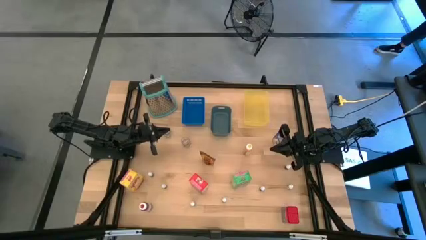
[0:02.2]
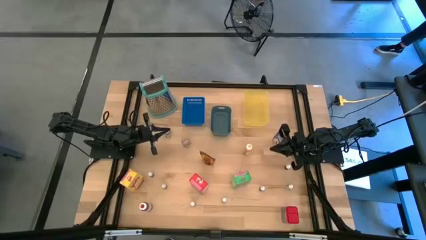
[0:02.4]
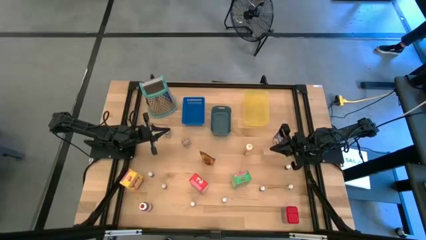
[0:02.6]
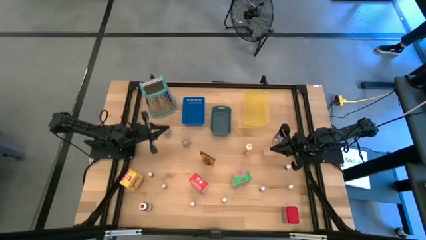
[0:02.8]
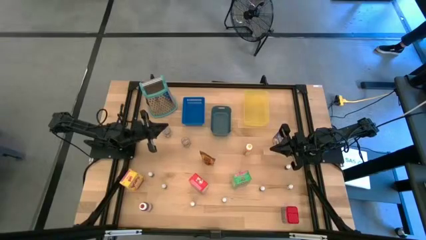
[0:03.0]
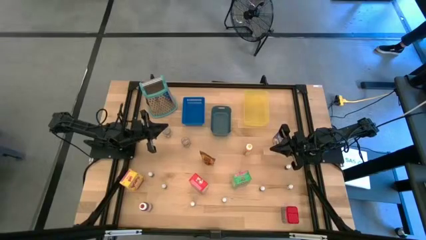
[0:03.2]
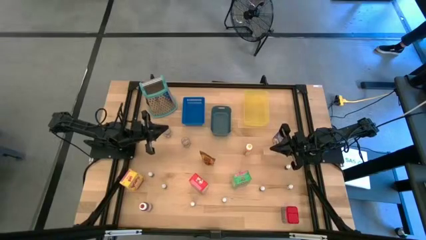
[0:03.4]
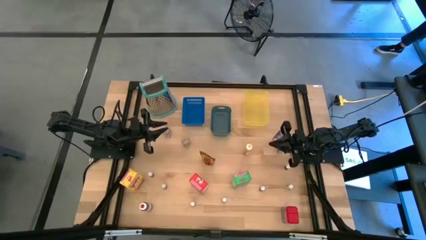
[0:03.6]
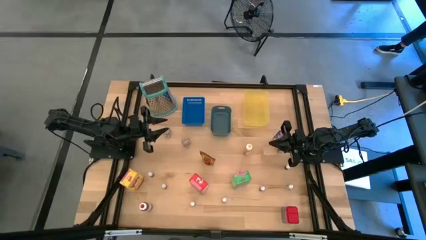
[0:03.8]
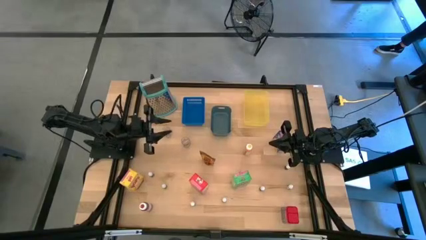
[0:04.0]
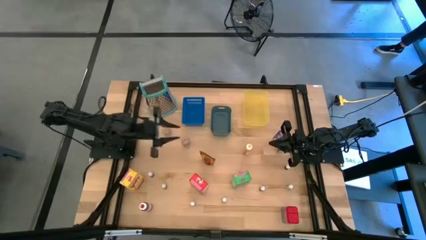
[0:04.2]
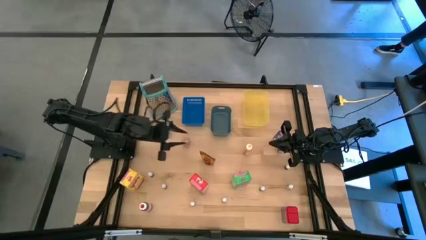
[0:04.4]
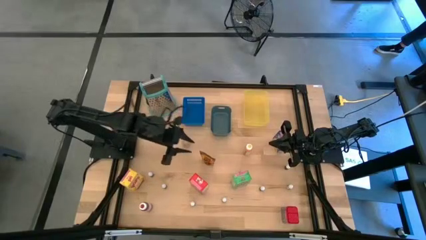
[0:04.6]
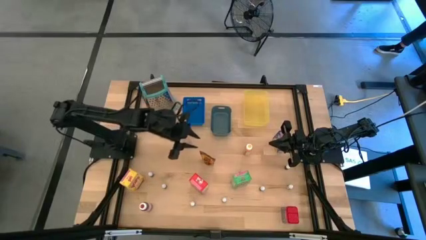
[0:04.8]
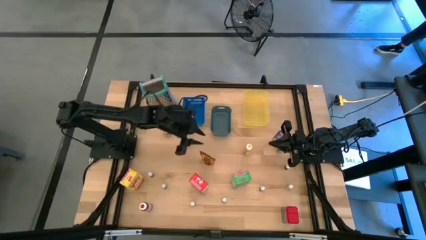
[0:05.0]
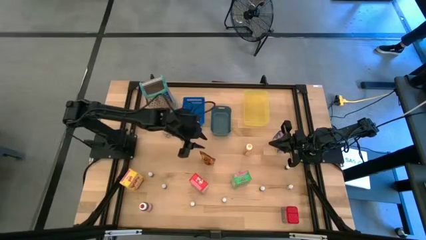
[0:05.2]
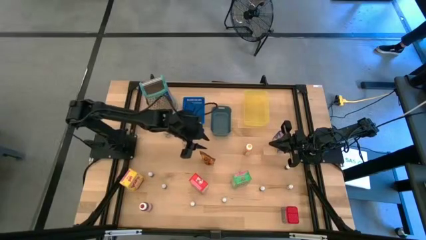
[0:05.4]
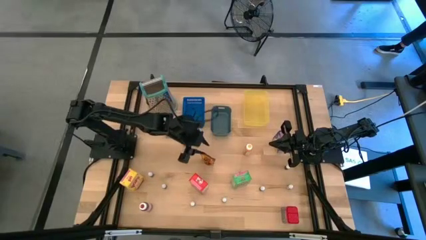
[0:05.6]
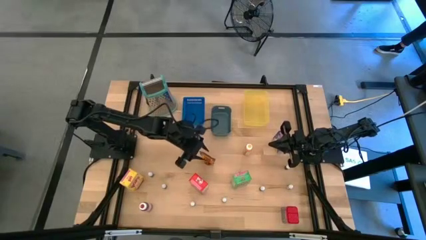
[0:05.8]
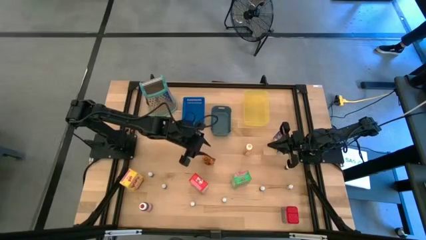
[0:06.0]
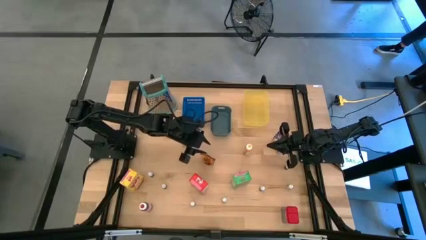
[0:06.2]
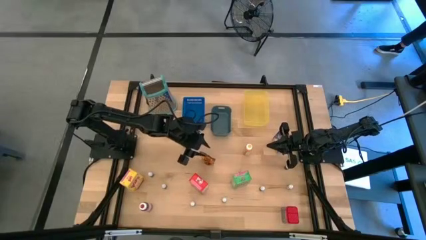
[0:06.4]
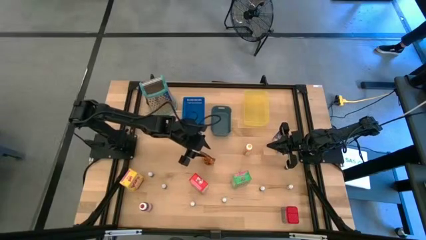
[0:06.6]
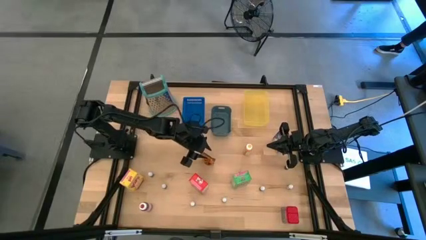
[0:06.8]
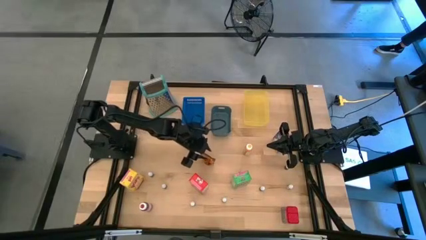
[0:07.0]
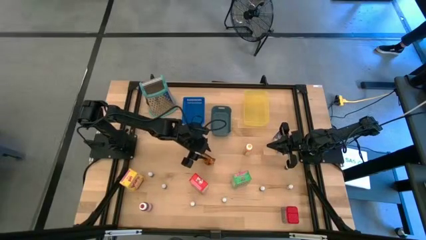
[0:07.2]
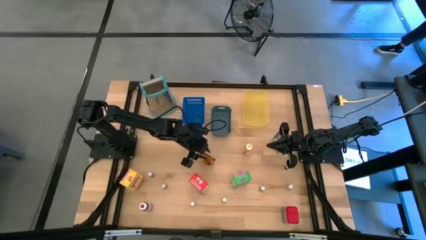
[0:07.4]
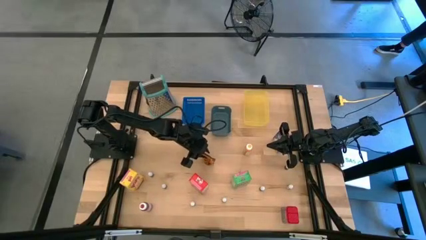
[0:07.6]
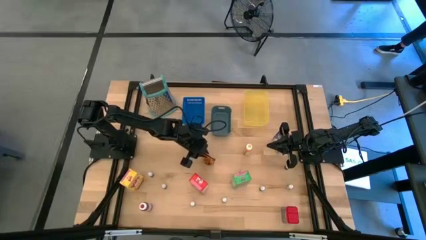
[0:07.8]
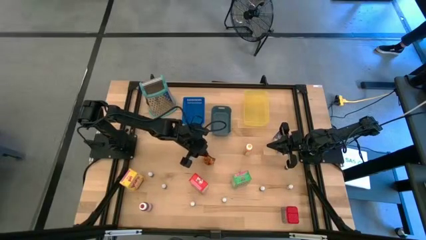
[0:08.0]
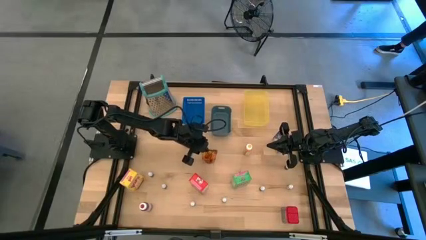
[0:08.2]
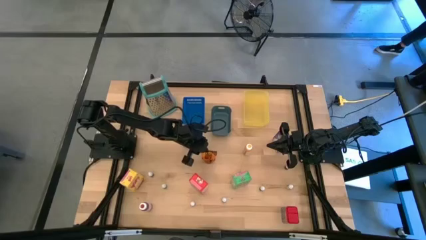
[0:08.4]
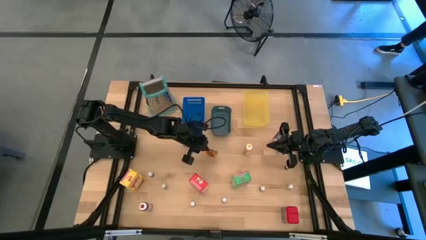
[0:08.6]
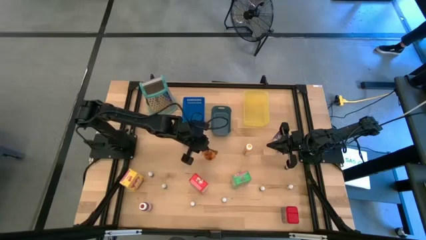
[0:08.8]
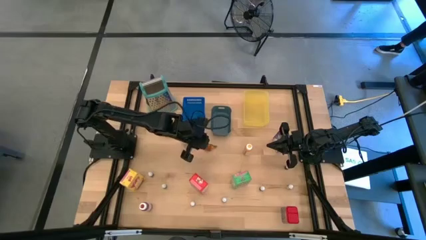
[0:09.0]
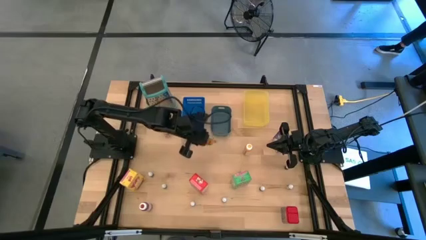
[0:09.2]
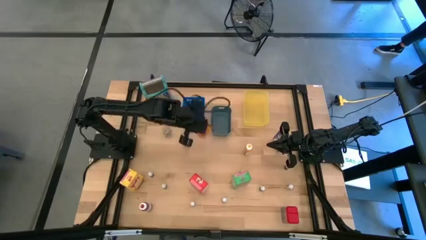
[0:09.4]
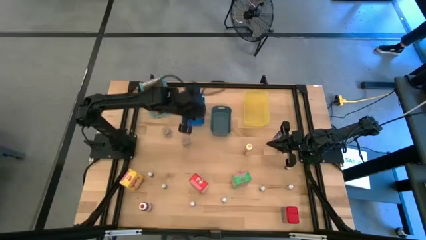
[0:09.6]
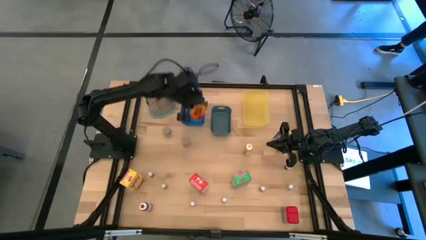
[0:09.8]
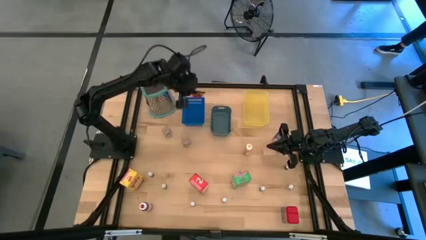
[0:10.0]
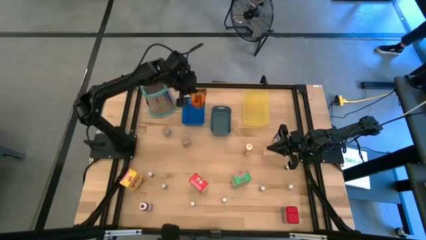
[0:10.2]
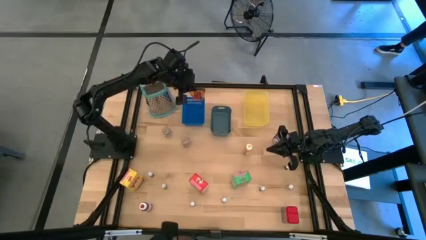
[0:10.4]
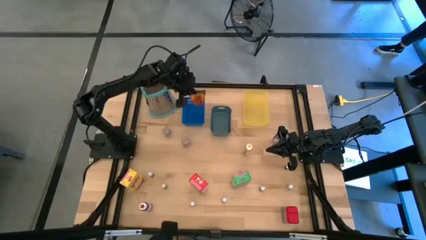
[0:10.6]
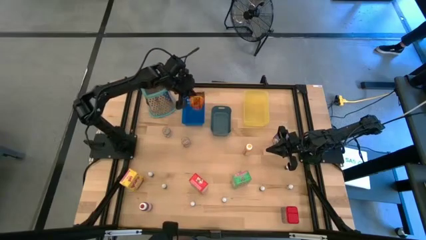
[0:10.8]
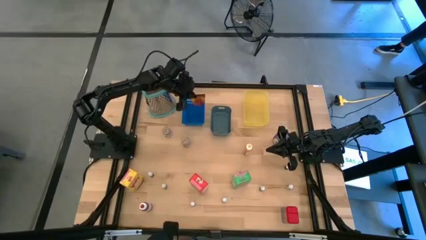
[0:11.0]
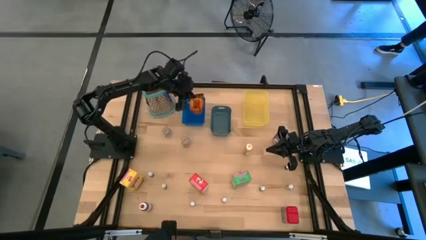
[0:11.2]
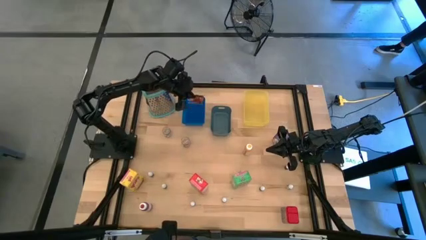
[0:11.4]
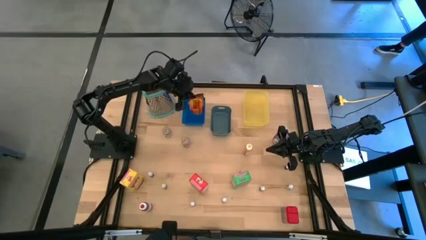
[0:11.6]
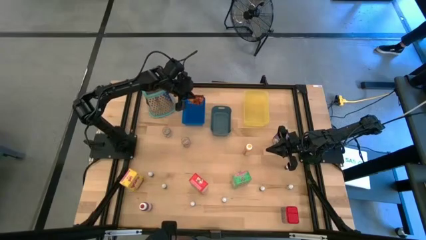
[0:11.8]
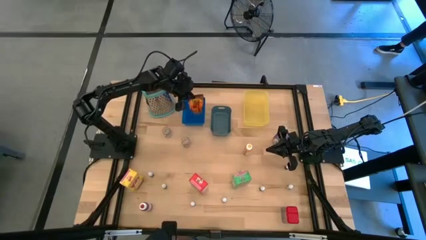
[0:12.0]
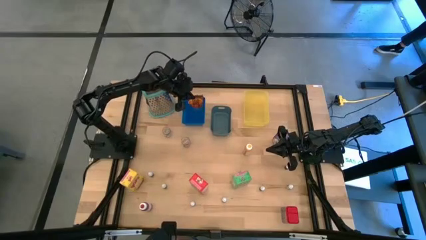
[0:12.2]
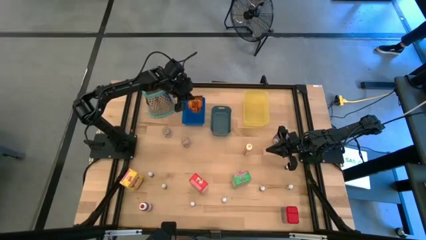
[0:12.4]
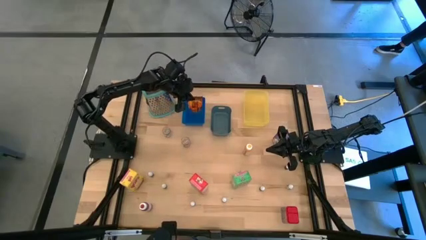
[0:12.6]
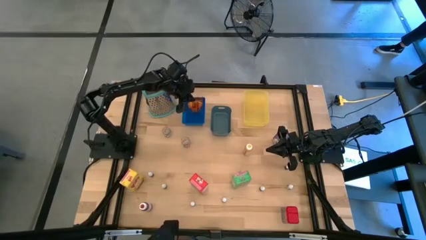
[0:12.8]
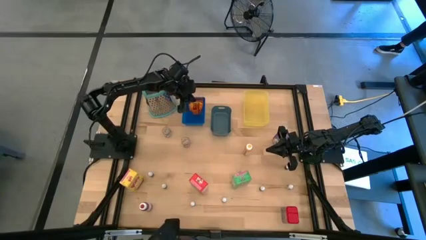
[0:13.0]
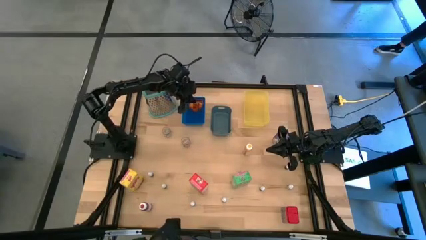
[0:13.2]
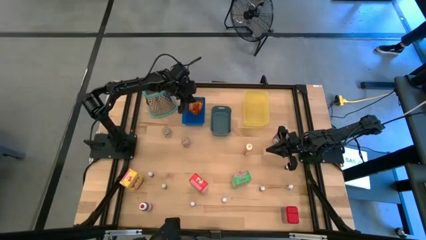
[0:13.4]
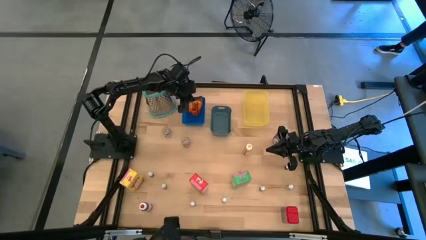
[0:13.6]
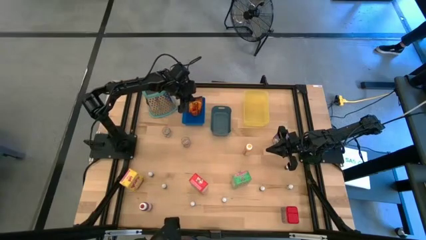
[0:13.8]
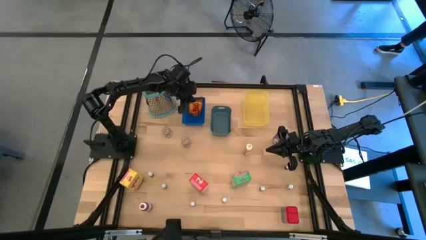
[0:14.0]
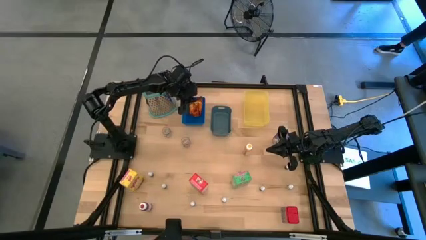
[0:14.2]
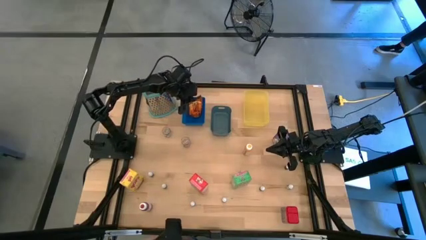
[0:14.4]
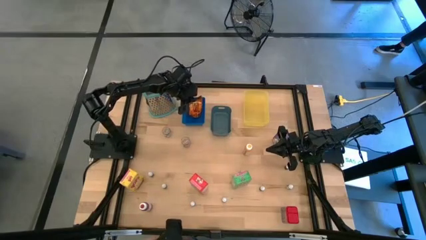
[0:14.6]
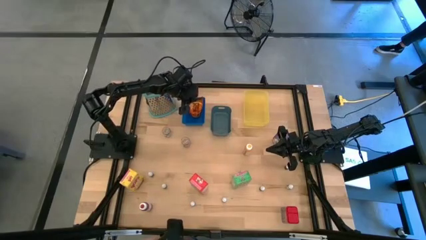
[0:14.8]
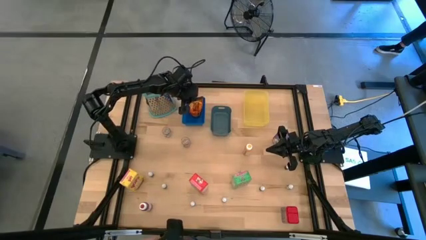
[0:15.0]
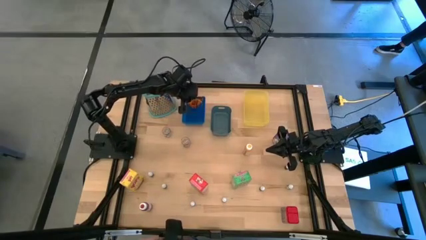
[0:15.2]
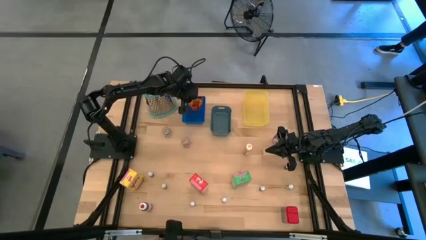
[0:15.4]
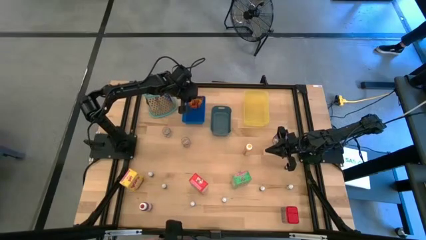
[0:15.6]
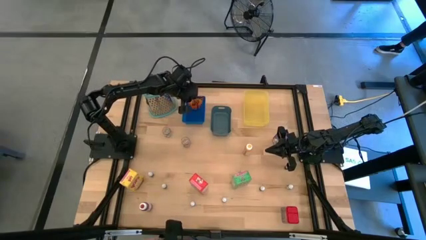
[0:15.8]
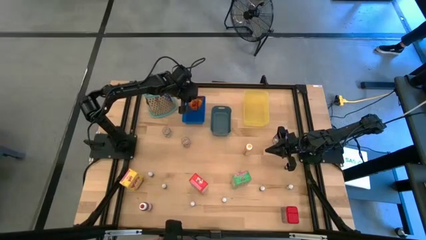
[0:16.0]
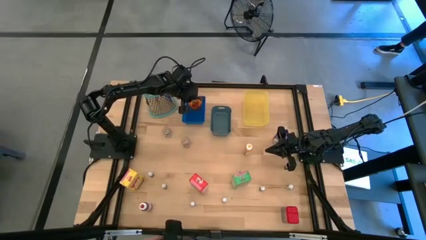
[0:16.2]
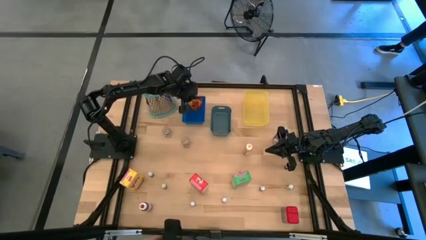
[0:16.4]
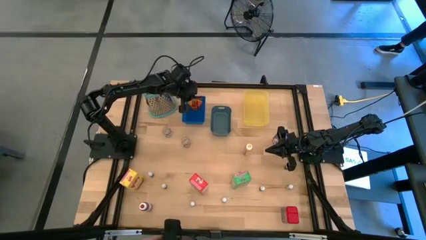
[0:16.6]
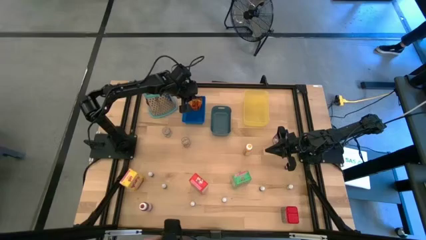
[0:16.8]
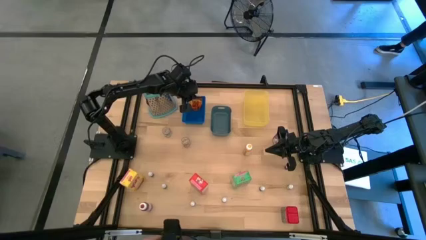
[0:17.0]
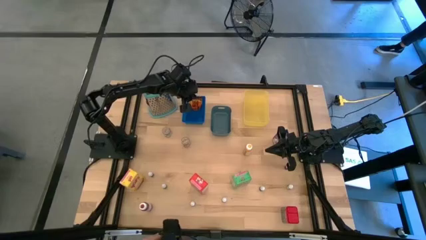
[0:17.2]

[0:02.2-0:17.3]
Task: Pick & Place Kitchen Items
Put the orange seasoning pack into the blue bin

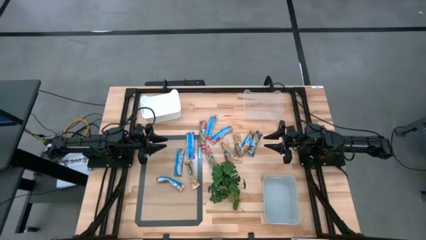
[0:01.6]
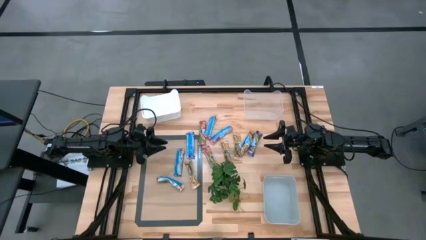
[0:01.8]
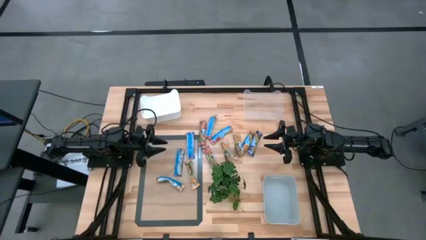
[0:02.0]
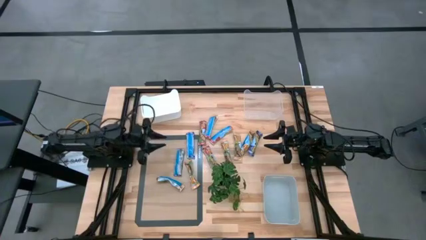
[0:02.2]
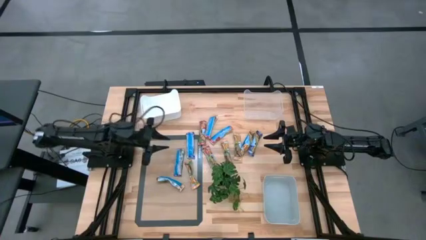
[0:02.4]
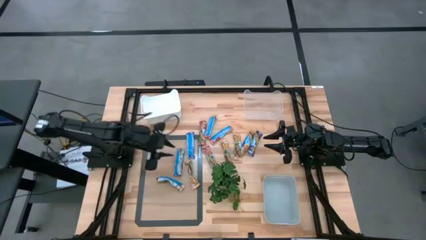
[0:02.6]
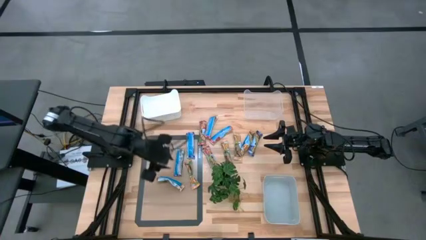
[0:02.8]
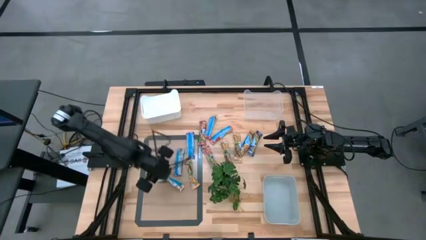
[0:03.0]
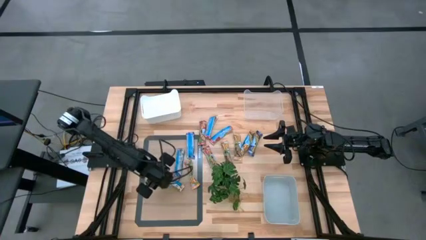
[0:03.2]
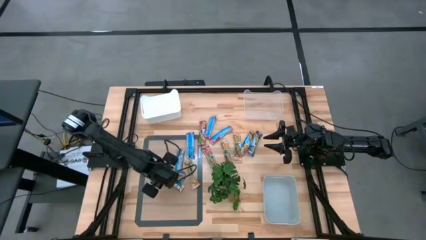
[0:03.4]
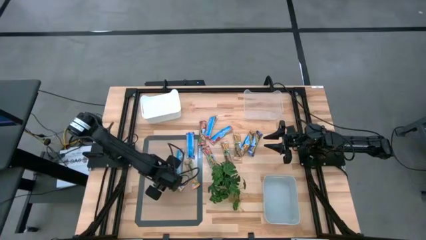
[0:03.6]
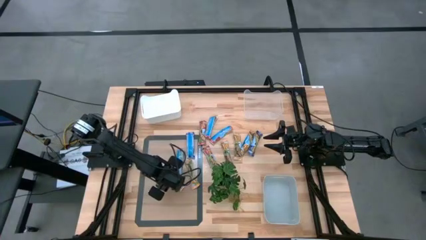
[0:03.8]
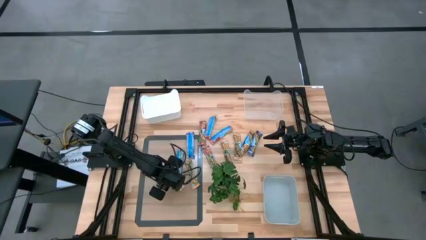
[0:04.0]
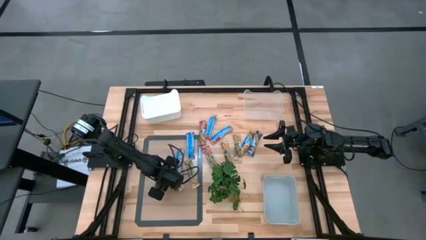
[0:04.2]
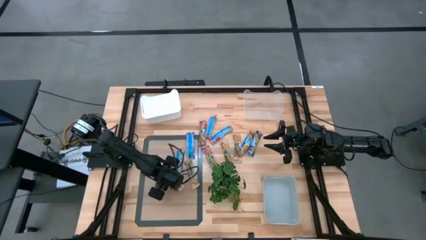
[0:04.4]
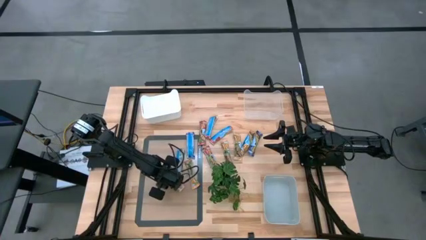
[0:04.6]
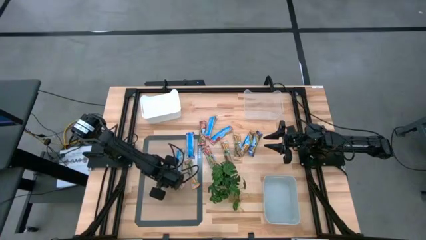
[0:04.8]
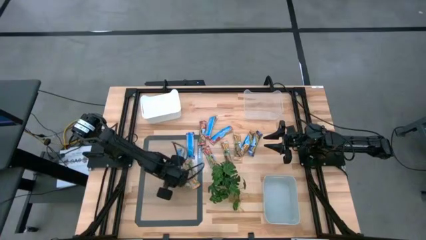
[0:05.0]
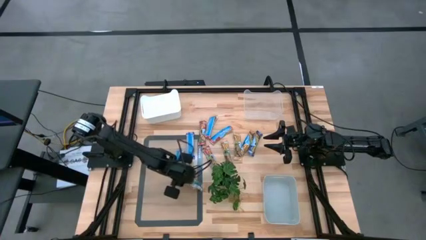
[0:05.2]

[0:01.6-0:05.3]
Task: Pick and place Granola Bars by type
Put the yellow granola bar into the white bin
